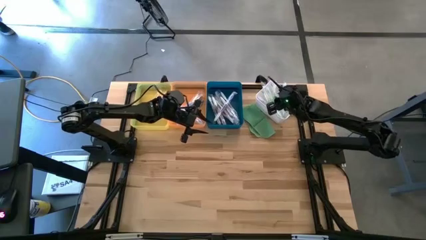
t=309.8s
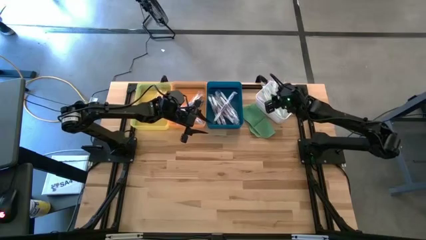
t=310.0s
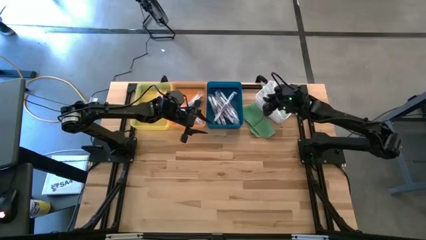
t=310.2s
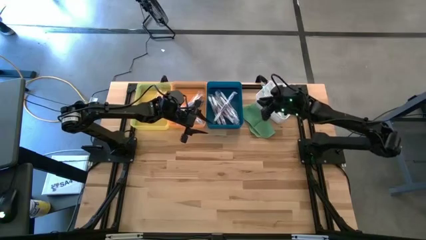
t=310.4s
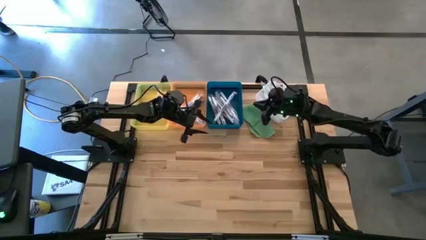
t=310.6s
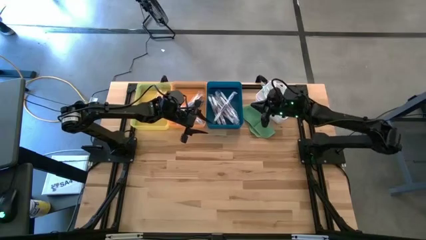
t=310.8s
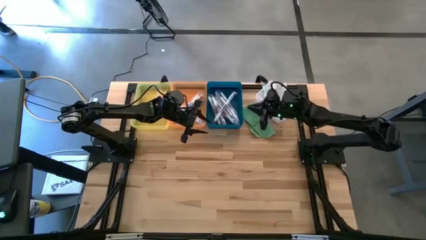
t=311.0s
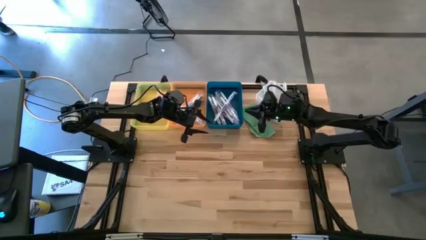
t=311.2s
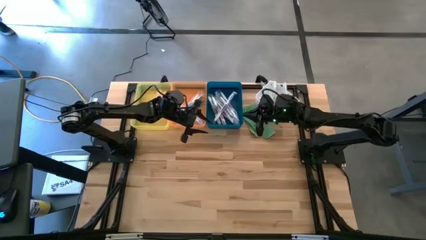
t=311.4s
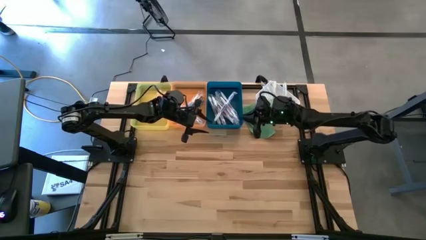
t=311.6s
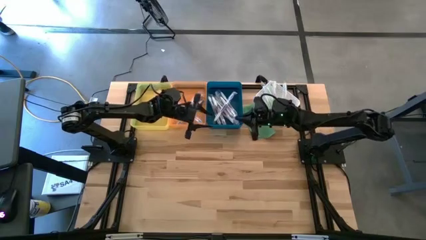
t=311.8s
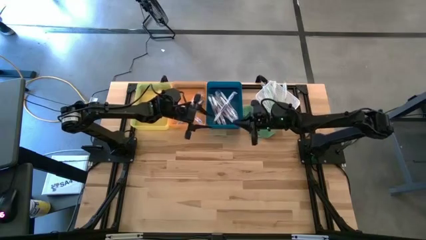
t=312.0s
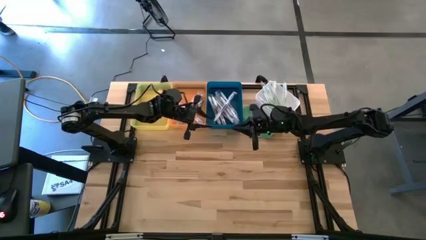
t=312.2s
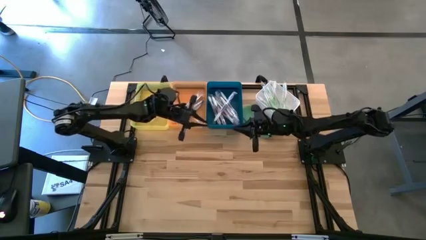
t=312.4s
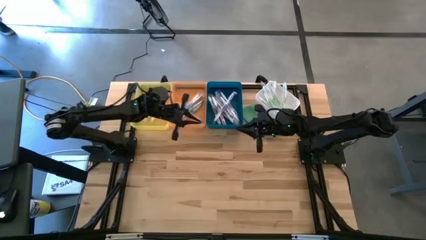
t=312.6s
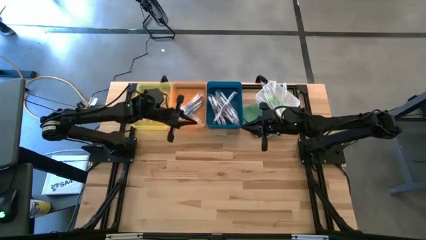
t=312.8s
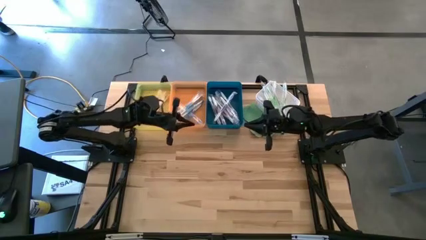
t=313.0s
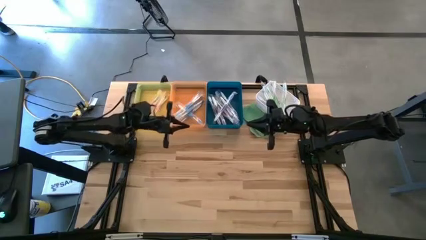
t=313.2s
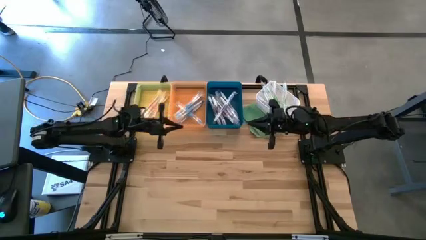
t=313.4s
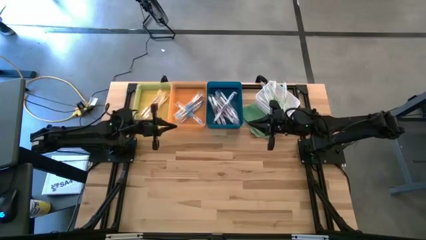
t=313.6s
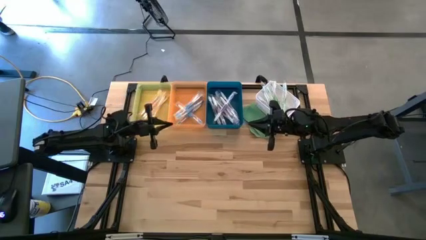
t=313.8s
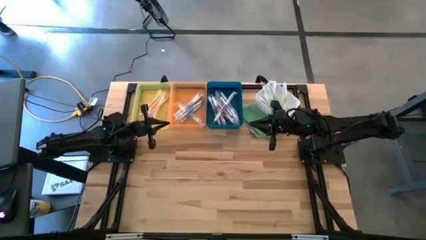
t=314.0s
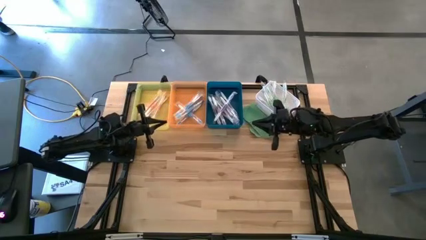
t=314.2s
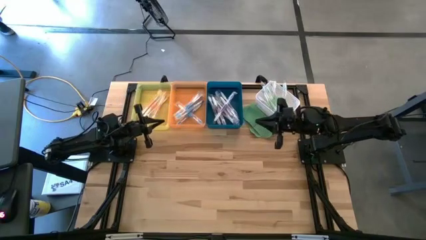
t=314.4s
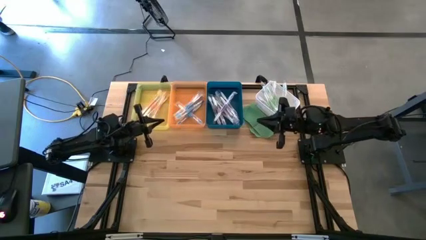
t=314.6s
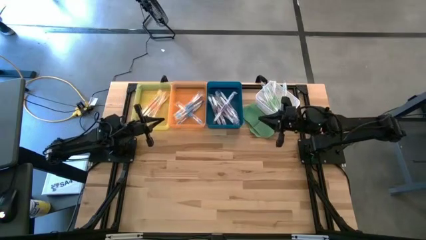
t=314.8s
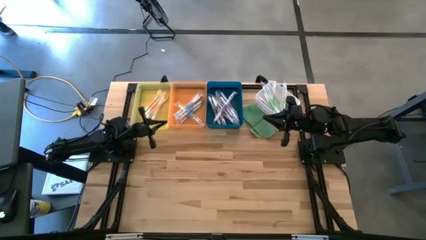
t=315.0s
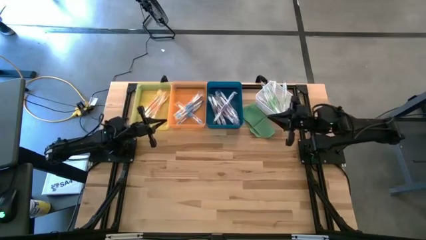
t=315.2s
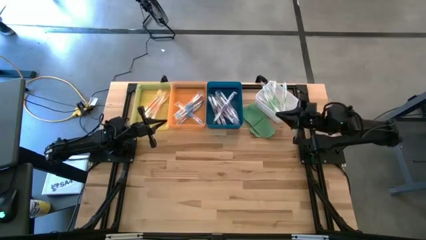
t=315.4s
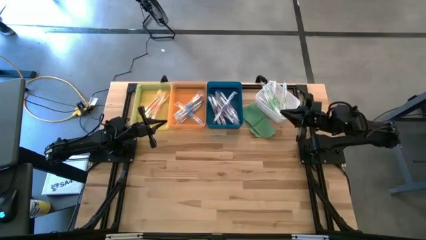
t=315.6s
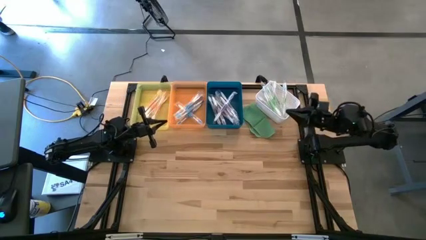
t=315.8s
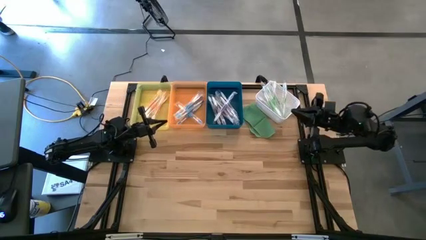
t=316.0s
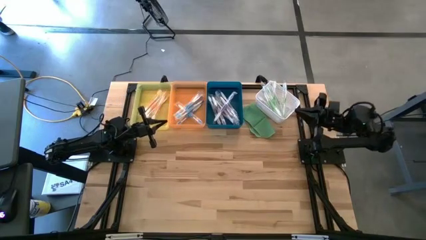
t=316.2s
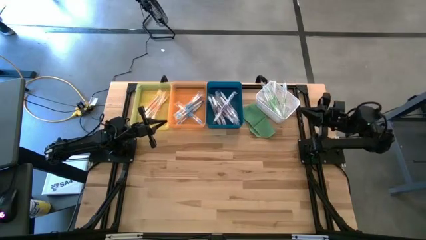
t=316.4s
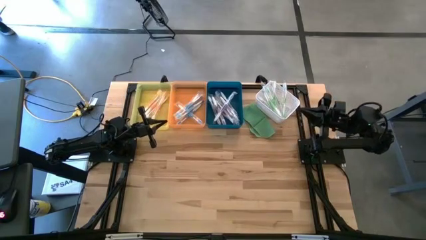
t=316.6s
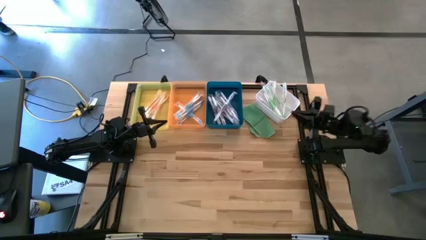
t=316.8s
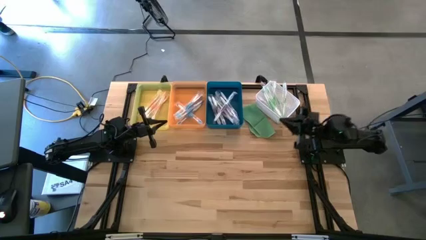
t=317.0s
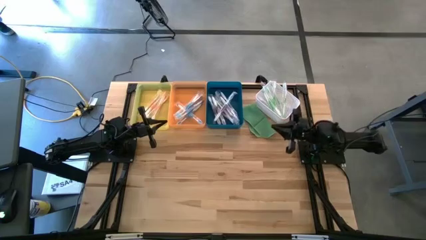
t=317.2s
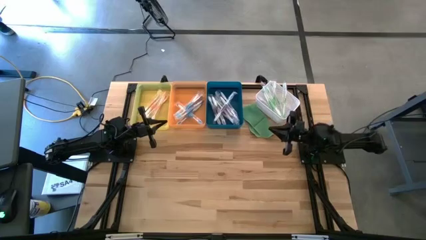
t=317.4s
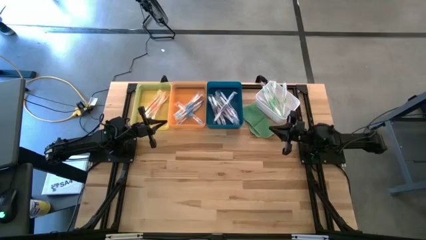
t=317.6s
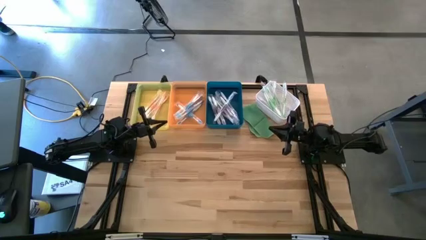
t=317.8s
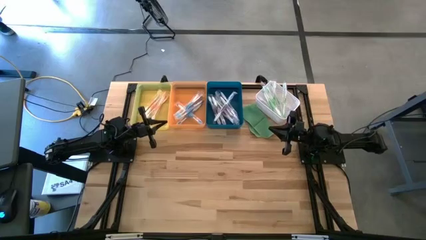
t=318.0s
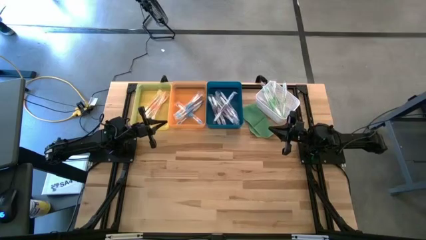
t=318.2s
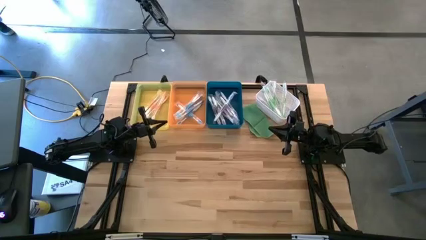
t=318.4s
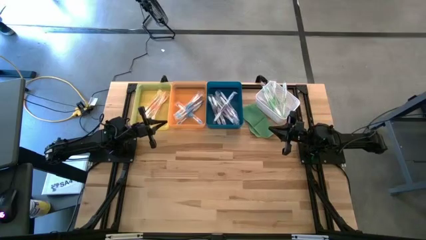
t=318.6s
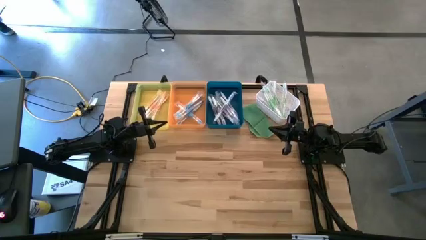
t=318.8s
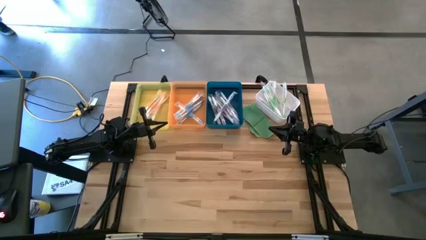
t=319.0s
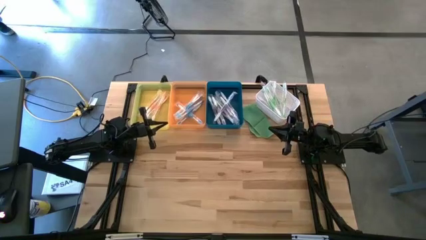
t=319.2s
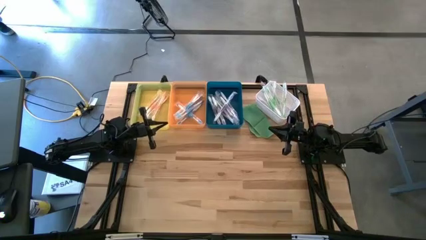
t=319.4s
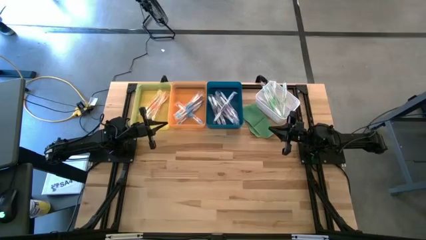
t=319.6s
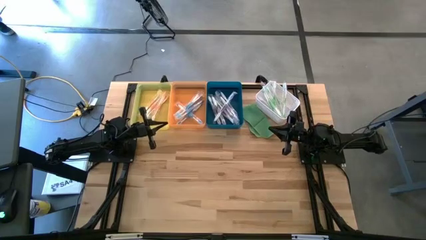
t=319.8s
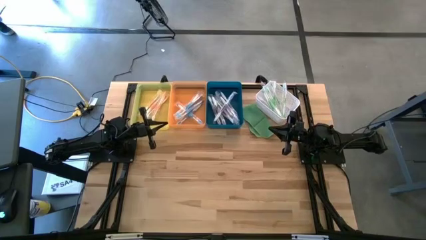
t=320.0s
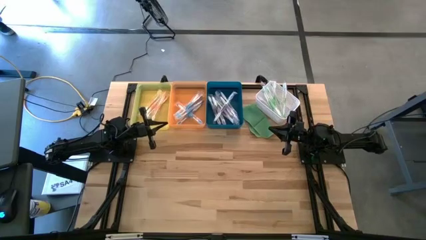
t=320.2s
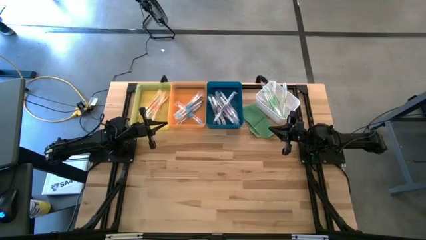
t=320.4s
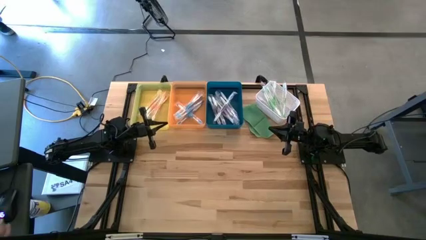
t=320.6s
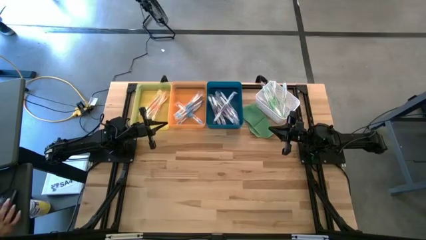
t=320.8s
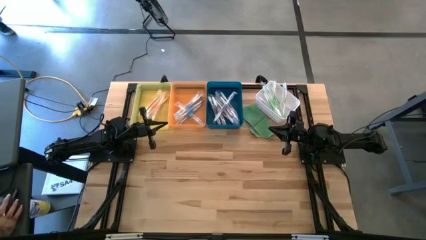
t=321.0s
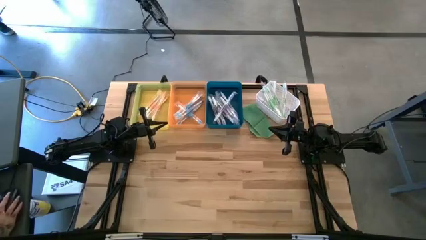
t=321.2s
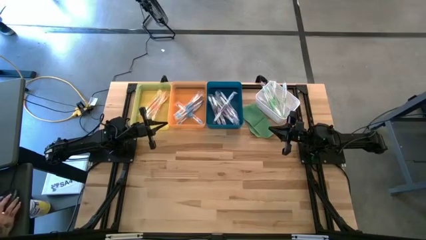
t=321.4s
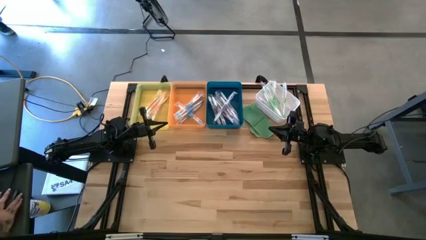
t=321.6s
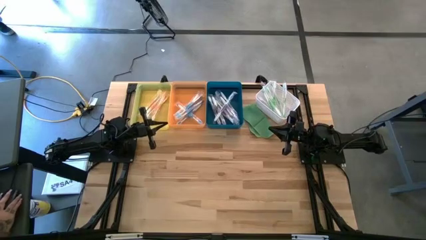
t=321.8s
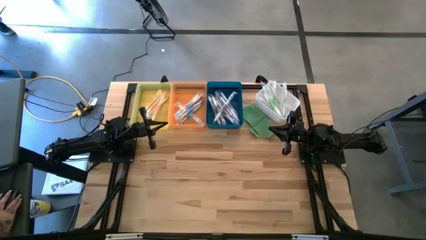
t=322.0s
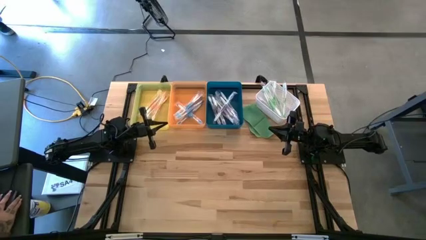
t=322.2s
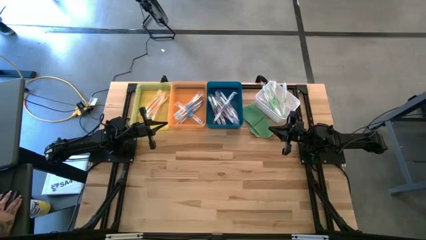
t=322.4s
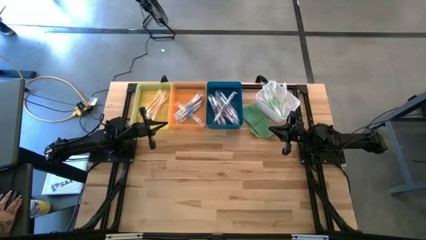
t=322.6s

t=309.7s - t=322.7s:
Task: Pick & Place Toothbrushes
Return to Home Position
